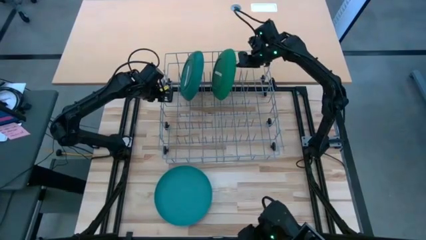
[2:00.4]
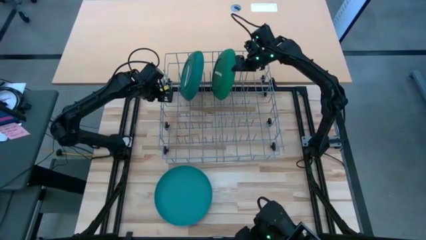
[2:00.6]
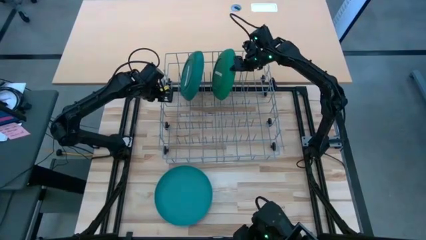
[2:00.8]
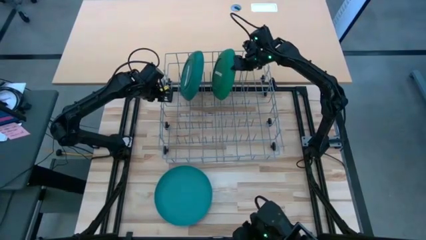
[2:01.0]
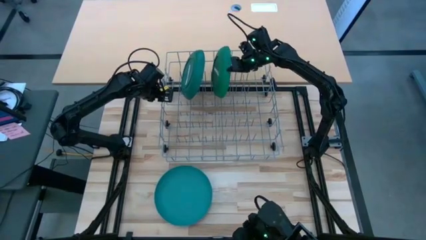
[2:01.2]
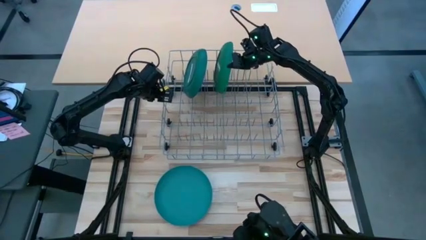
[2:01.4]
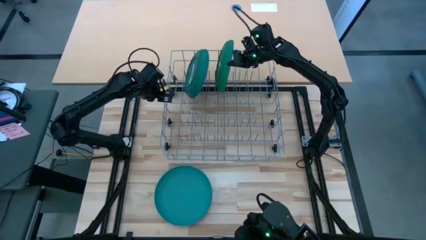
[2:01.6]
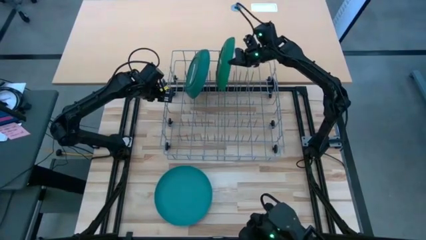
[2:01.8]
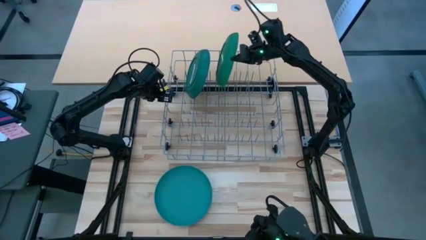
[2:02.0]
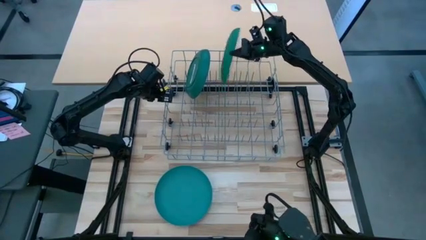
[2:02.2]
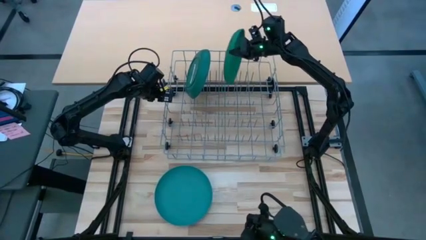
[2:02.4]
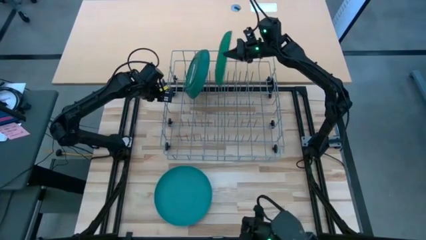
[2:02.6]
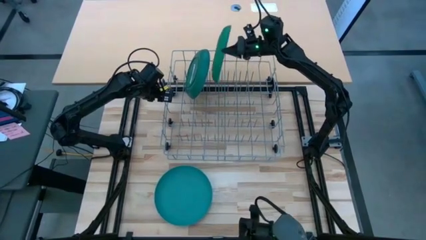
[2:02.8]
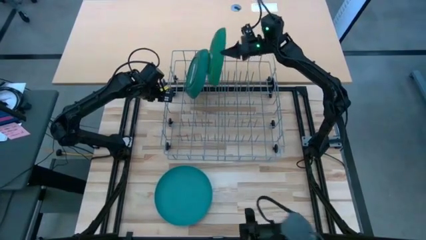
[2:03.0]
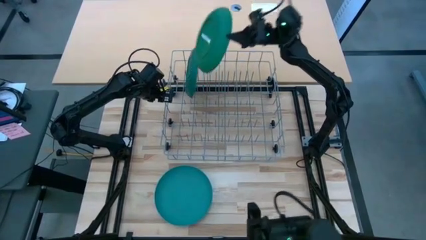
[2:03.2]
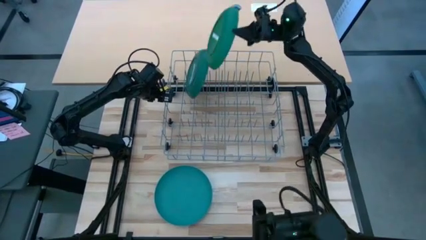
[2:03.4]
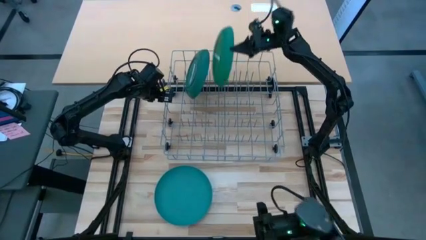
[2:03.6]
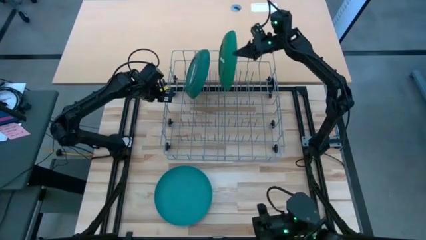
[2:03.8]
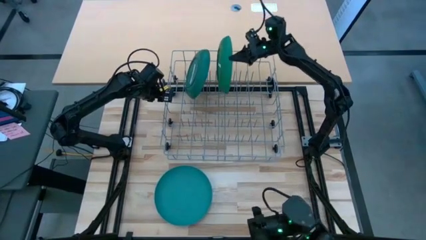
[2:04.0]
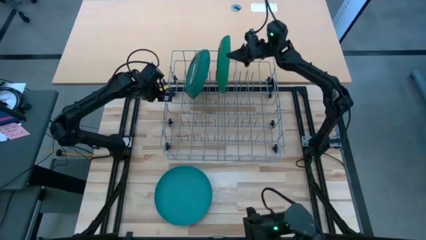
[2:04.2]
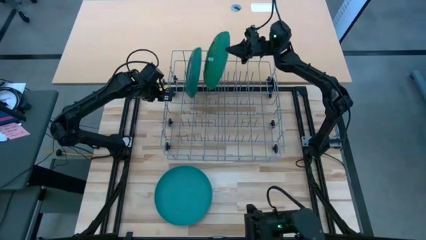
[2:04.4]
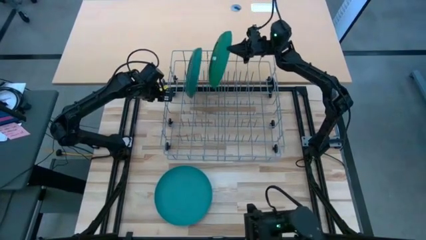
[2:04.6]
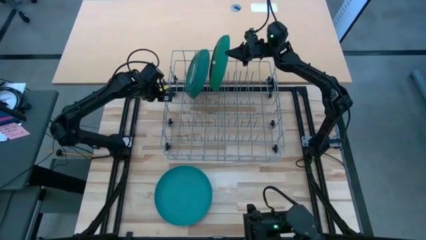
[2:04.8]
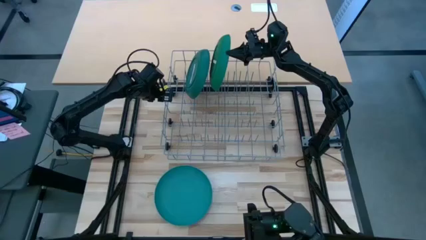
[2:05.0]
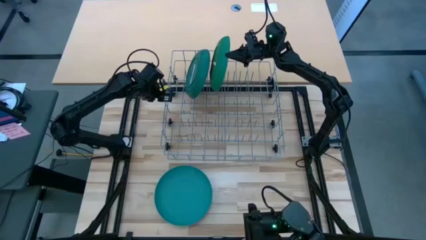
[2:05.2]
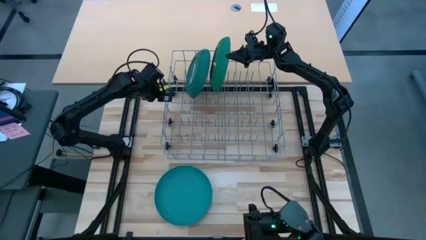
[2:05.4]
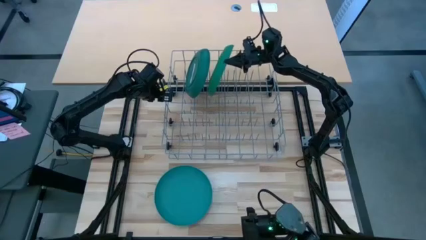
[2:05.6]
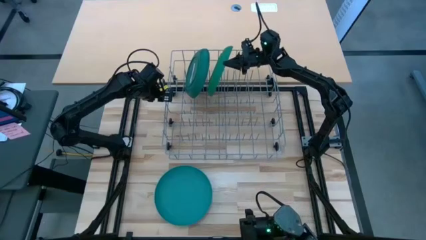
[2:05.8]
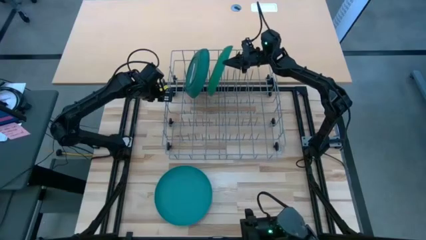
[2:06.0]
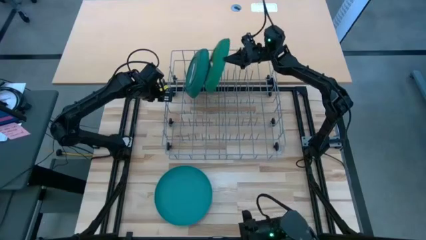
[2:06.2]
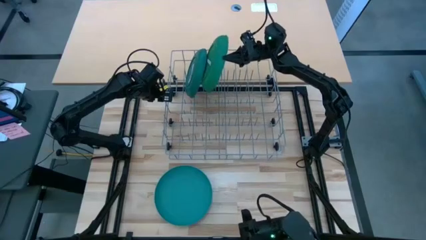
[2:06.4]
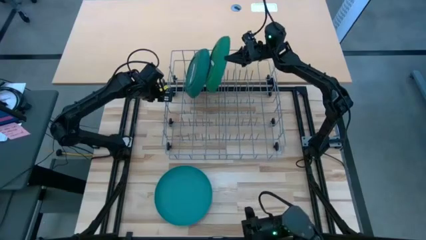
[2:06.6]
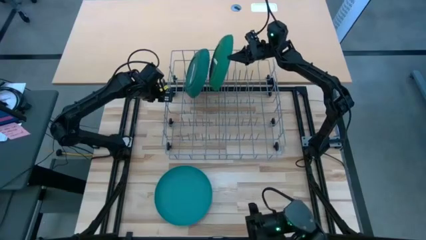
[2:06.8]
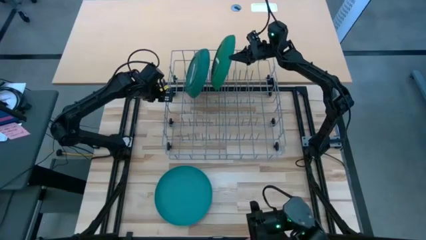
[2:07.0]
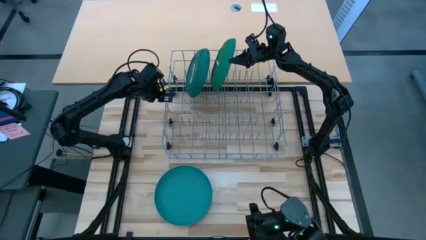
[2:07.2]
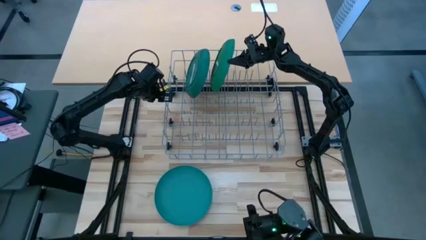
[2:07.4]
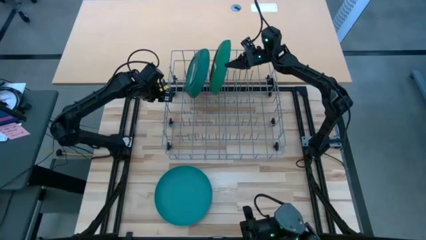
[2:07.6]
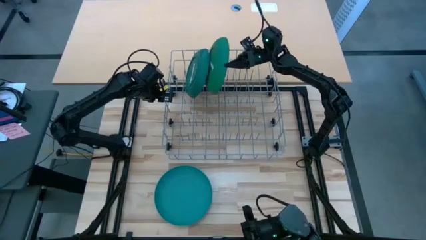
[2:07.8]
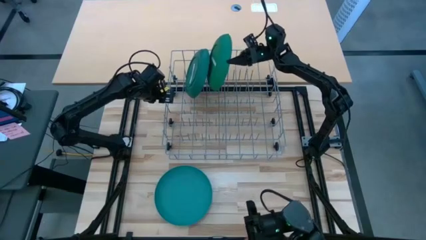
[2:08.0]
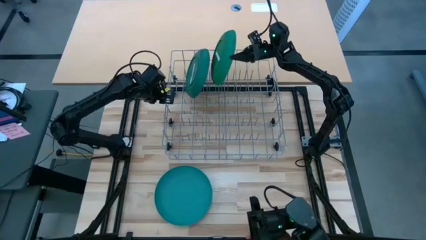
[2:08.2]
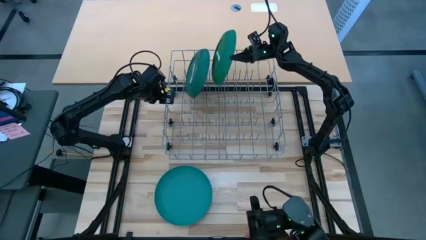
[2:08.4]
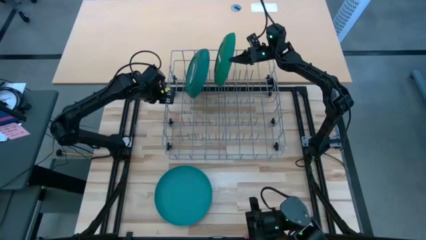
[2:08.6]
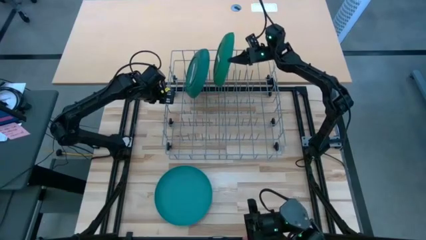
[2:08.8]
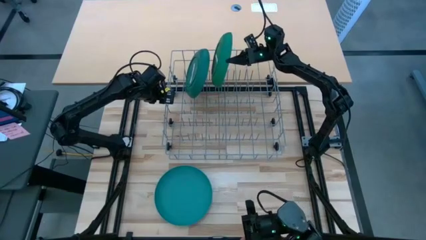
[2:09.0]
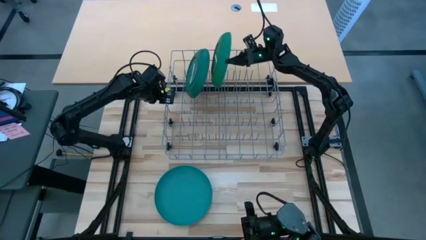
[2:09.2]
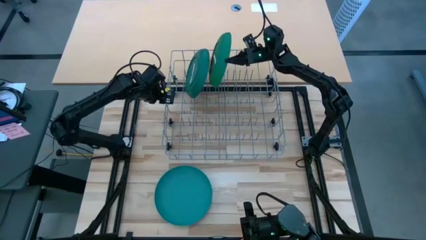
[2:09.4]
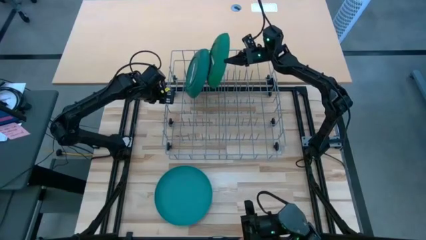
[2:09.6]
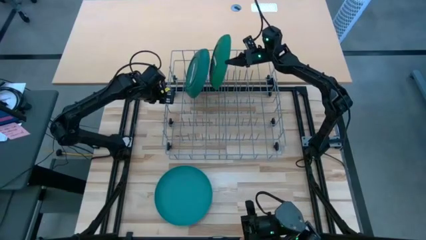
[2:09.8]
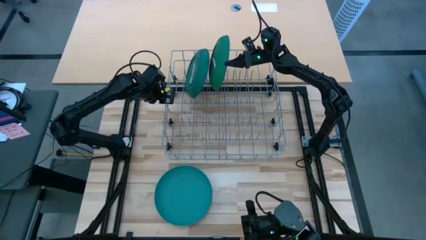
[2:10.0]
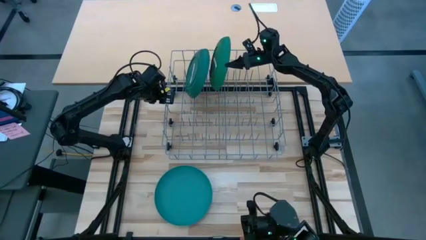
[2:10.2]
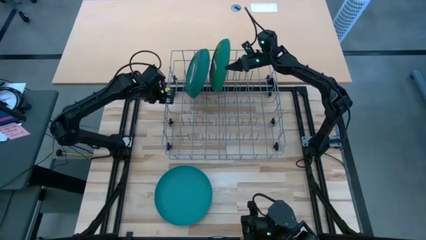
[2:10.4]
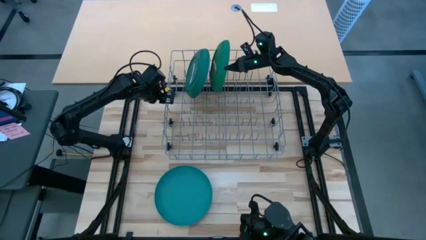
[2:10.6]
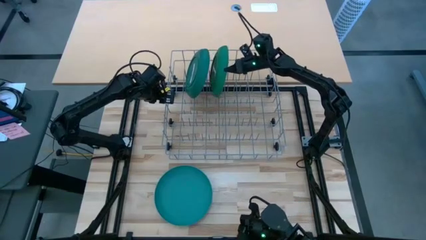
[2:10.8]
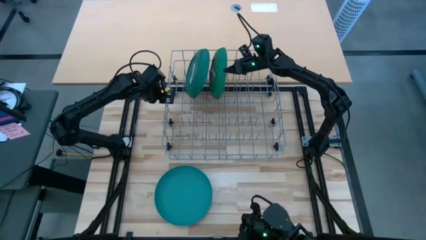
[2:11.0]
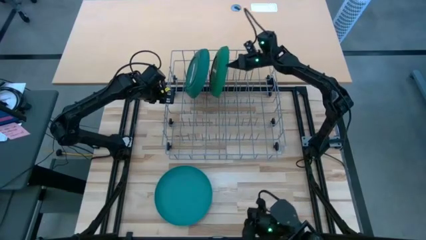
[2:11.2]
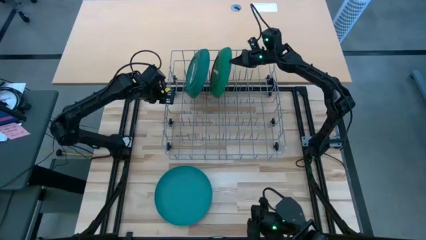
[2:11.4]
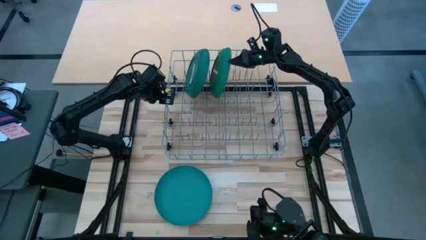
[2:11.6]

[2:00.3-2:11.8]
Task: Sort dishes
Put the green plate in the dish rack

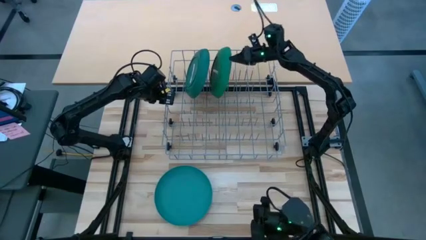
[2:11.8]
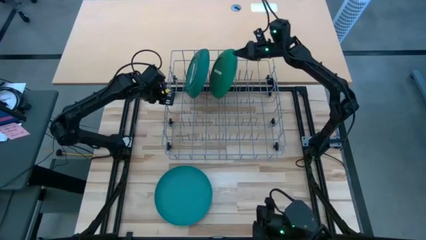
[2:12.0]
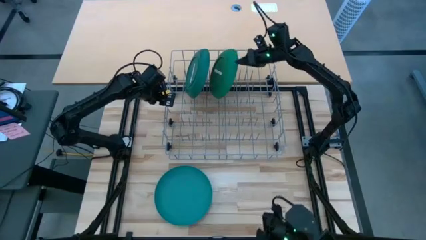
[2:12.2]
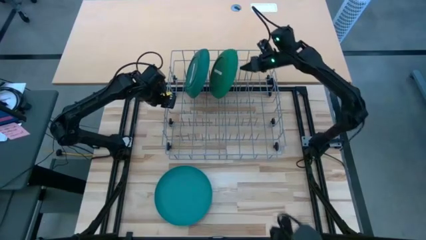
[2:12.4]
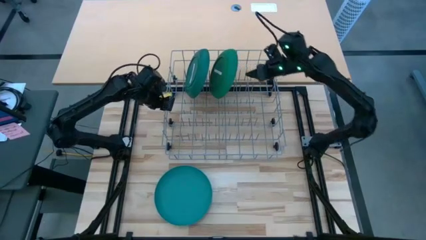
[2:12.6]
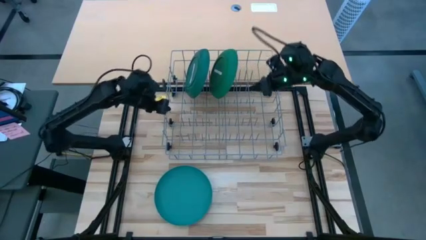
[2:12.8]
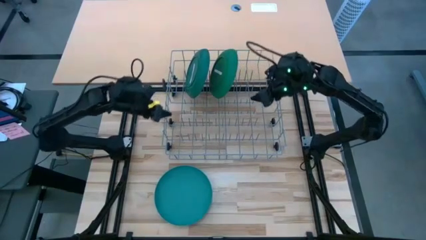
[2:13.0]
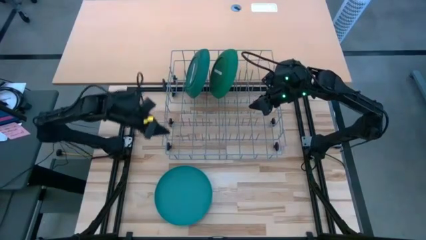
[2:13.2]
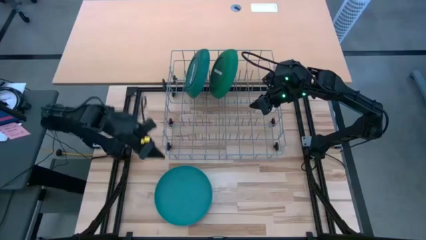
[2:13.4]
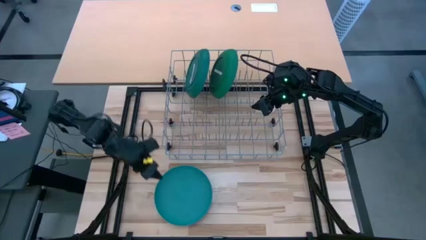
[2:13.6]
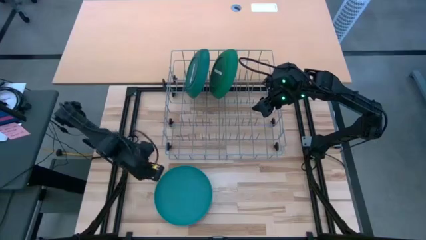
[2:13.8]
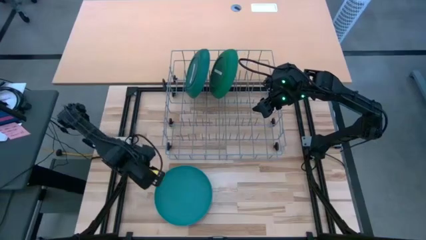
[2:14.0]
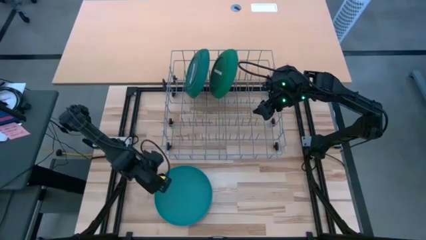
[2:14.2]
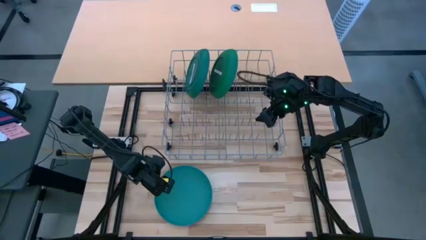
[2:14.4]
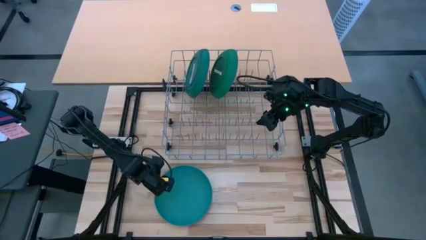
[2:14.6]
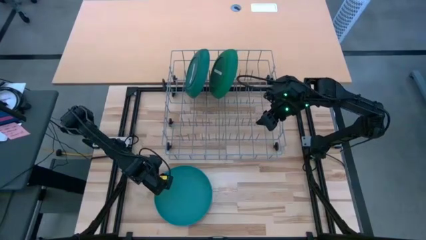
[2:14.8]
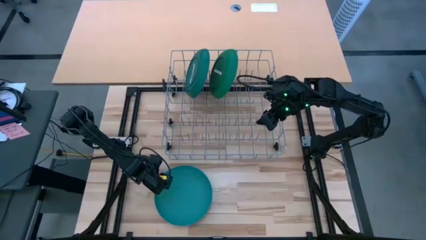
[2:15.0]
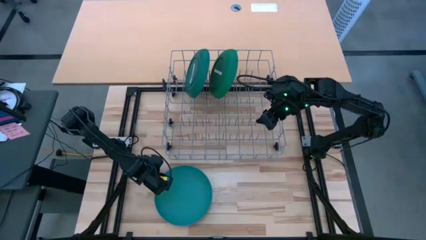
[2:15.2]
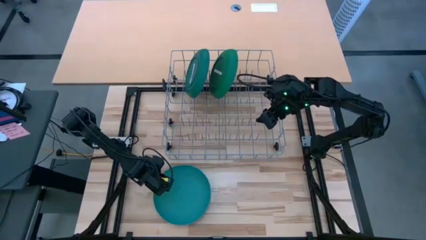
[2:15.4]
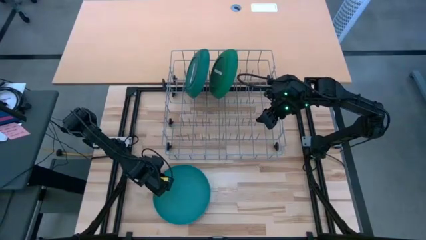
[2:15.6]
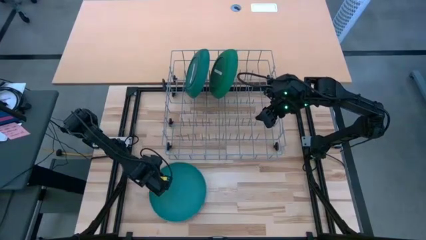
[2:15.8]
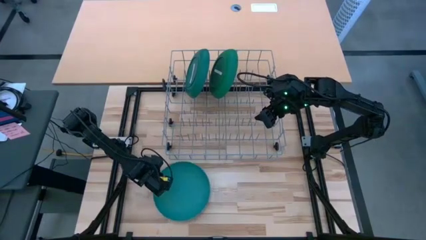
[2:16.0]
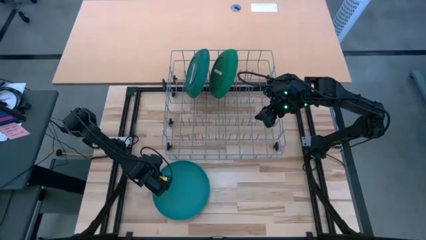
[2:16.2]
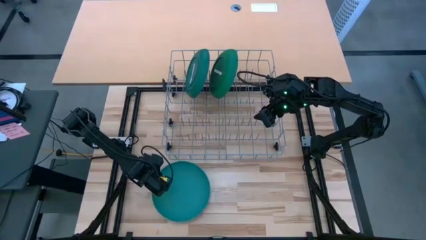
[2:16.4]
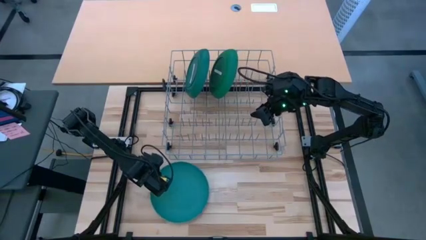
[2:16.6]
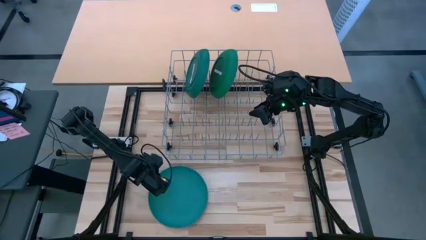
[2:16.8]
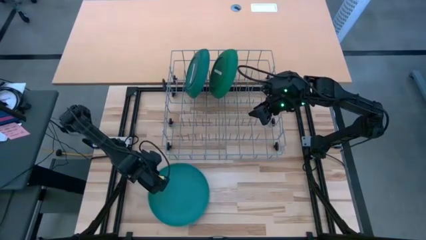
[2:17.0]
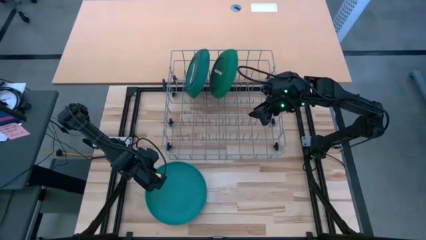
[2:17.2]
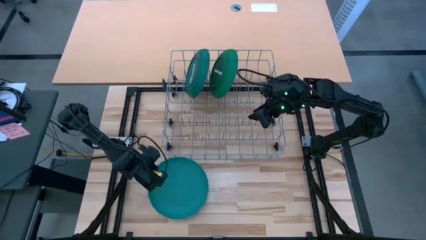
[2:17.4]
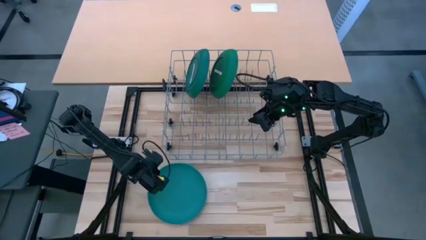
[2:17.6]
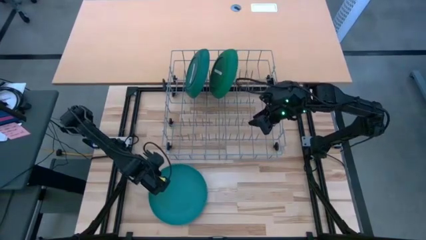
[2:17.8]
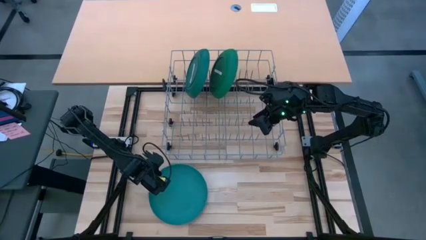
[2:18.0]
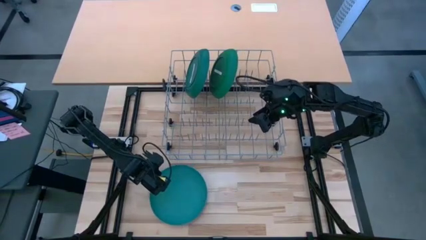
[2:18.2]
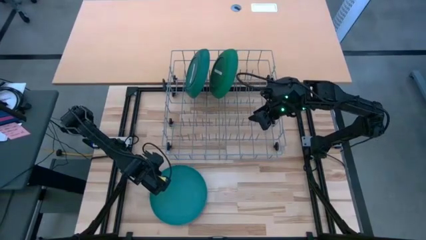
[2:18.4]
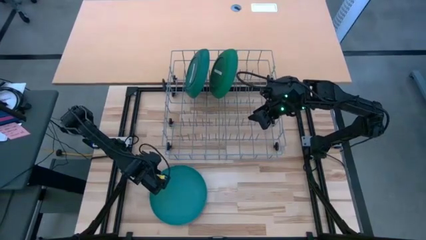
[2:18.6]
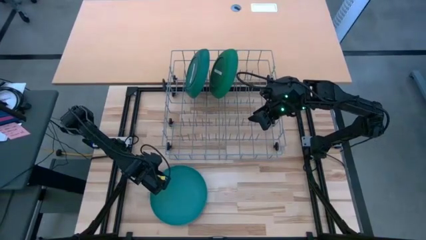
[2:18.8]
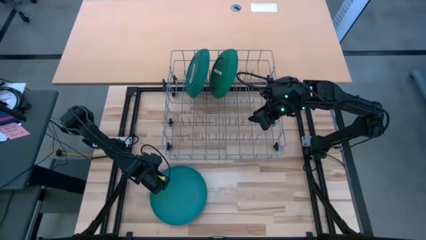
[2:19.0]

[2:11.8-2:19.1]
Put the blue plate in the dish rack
